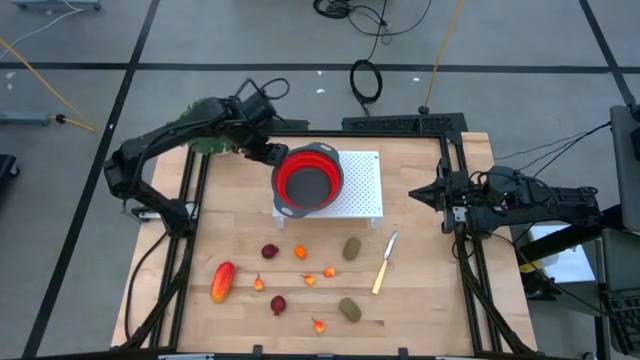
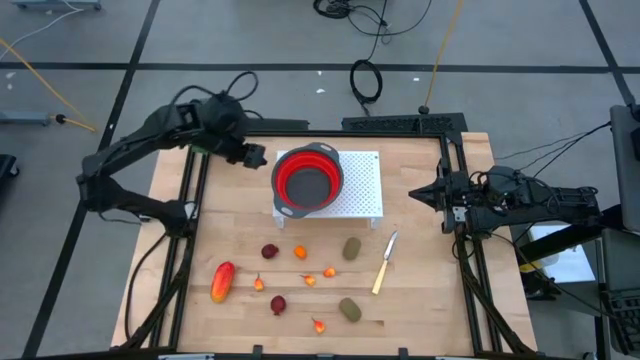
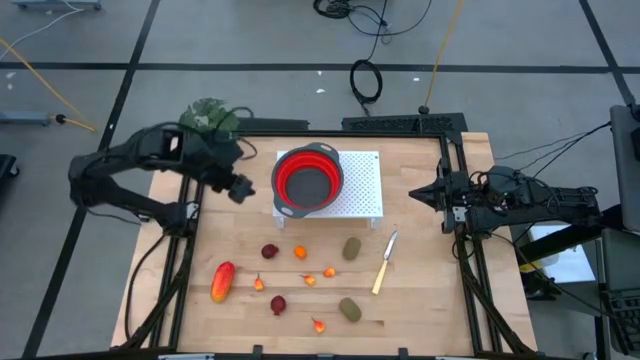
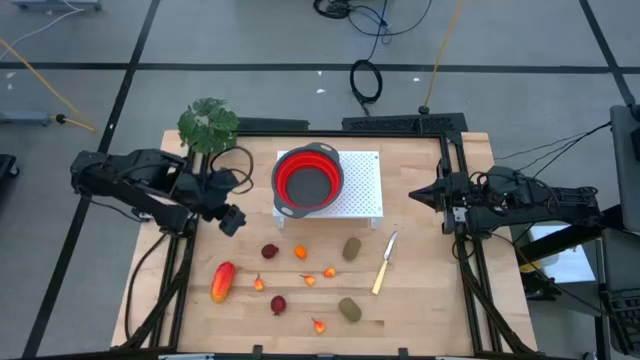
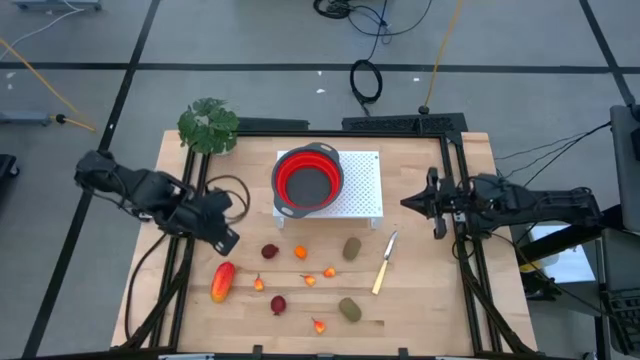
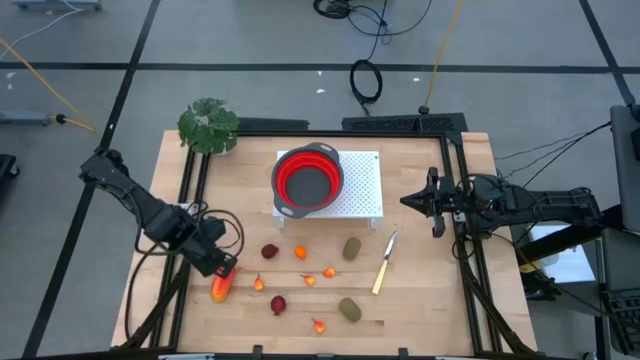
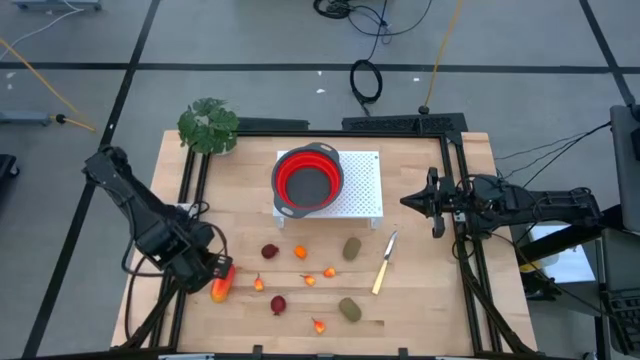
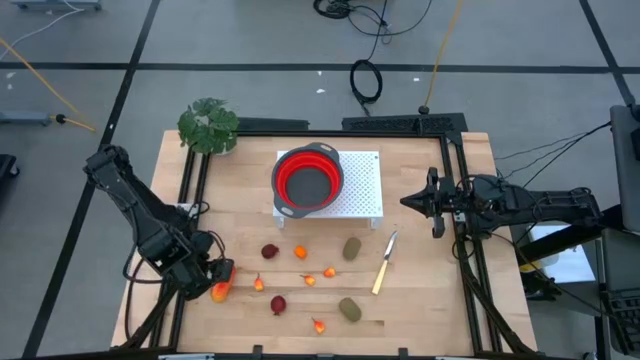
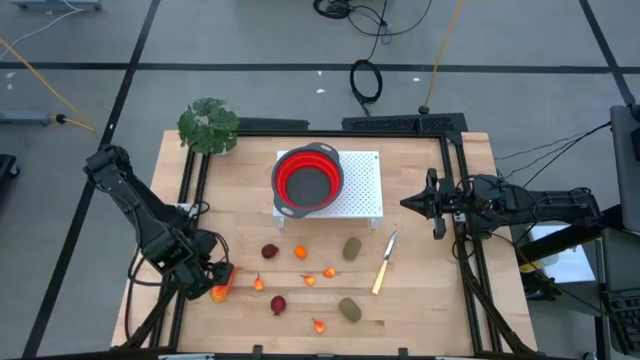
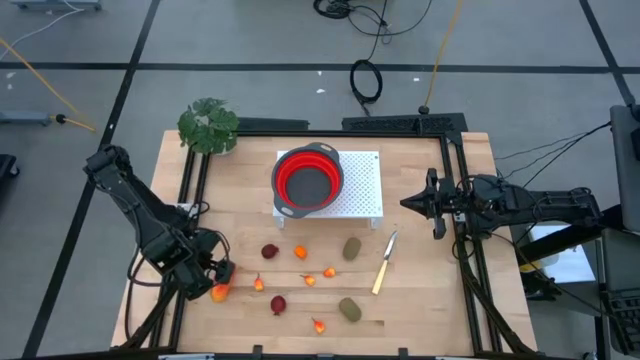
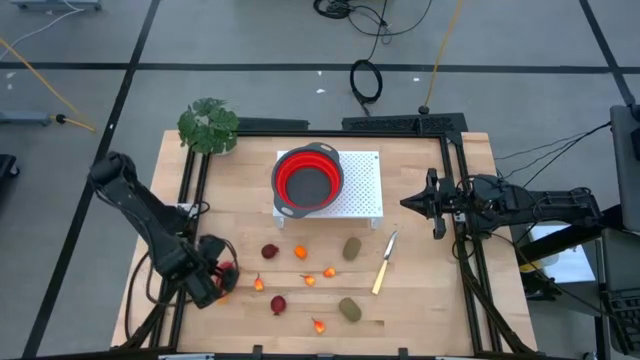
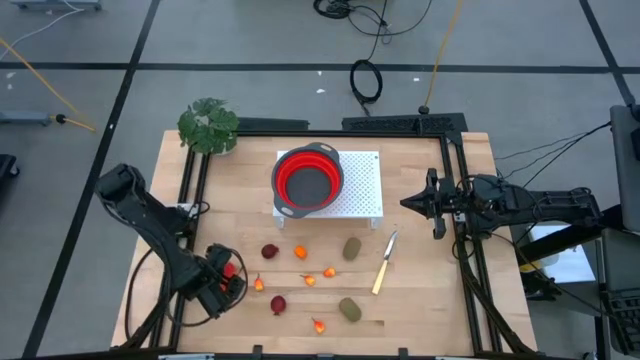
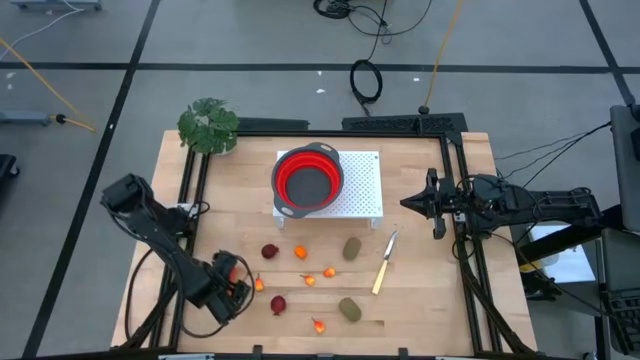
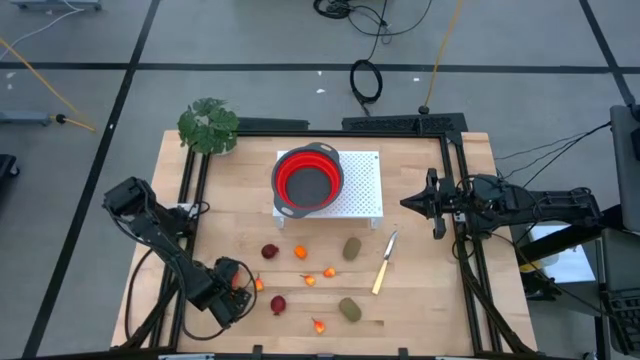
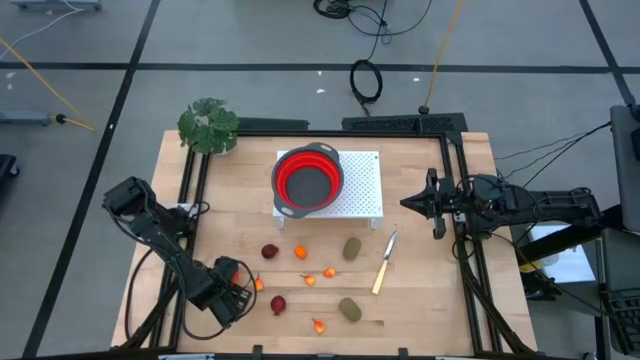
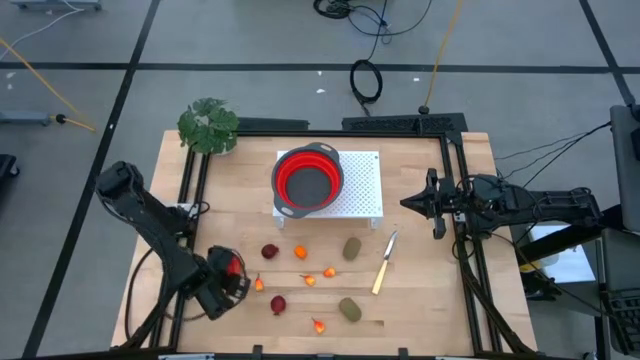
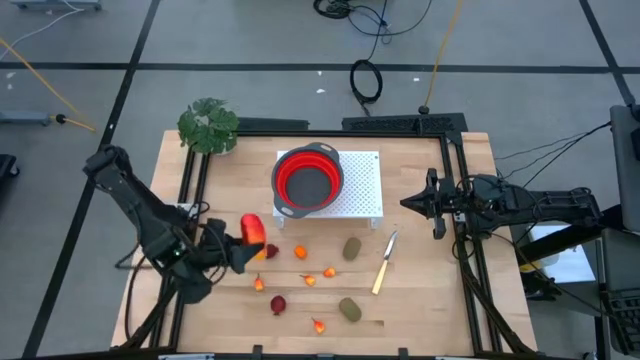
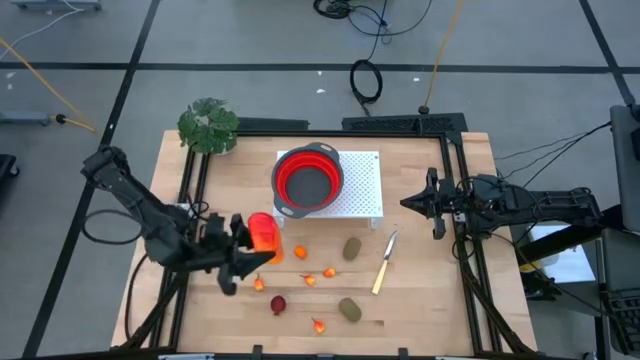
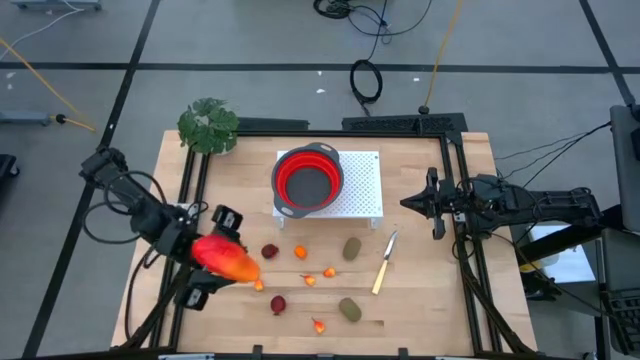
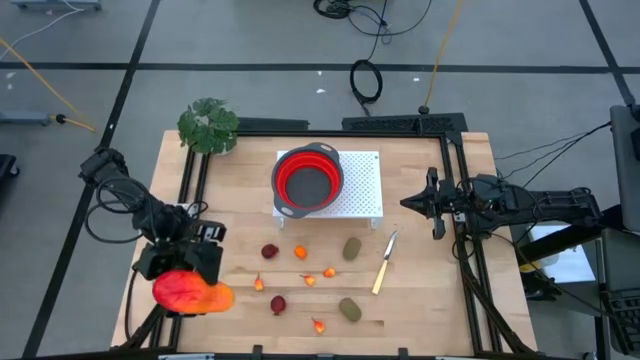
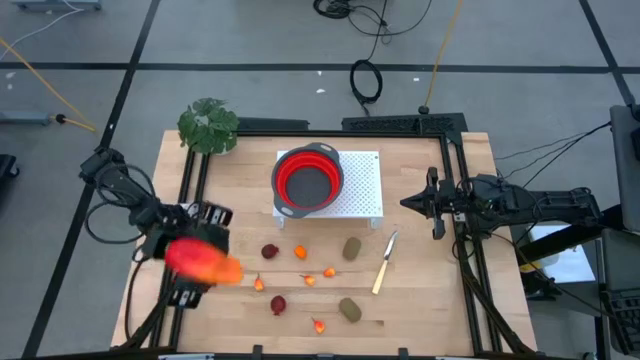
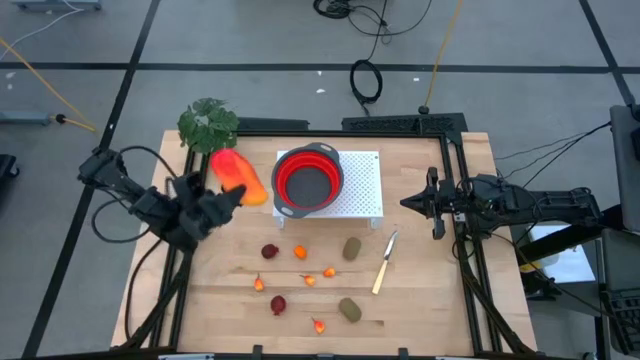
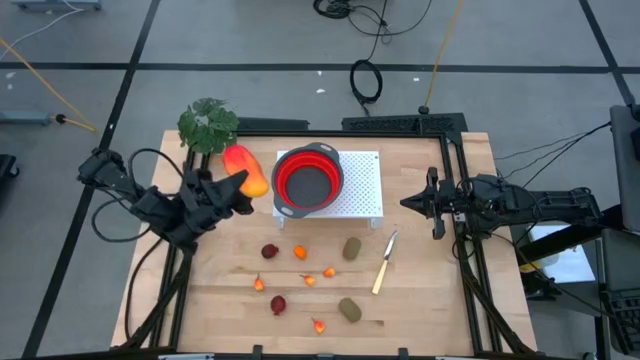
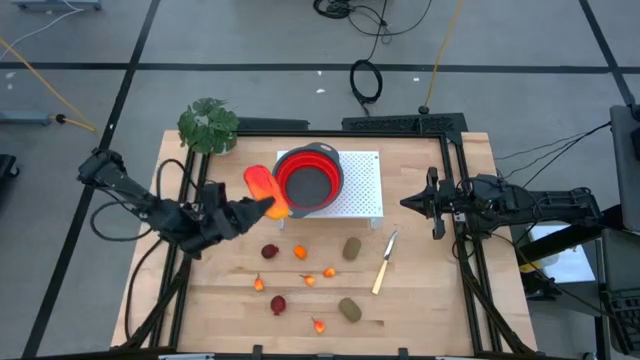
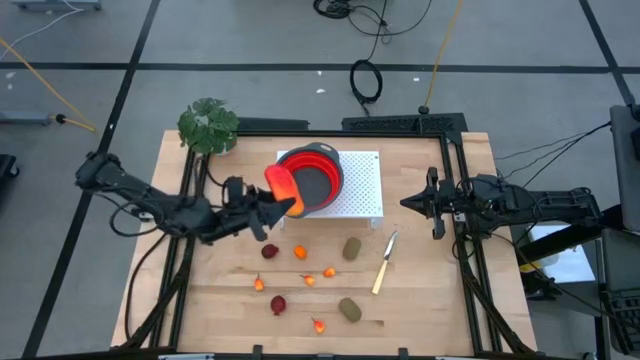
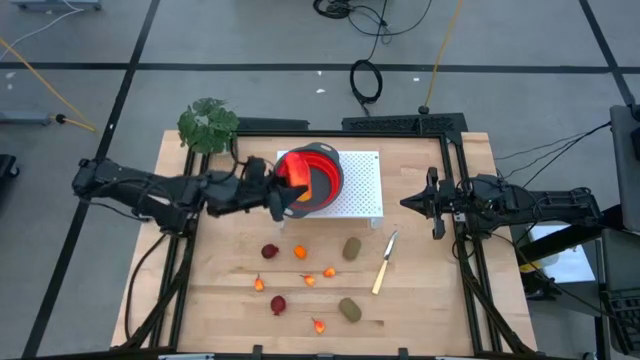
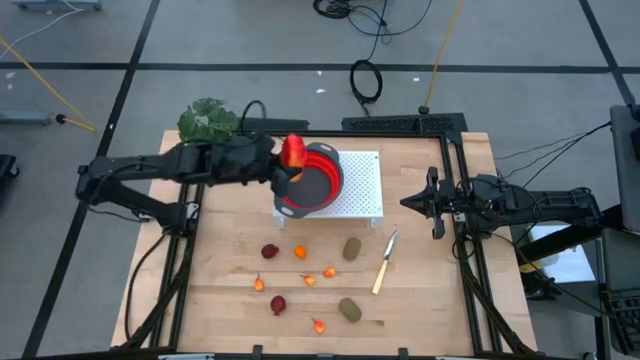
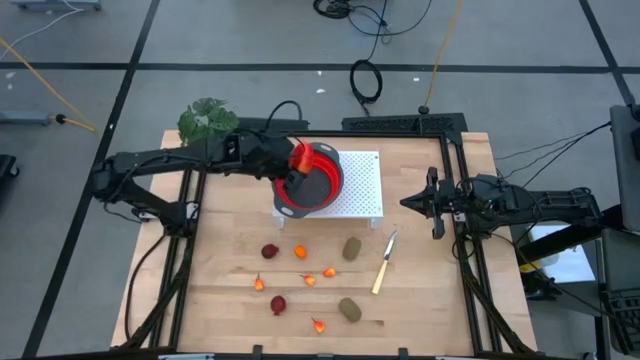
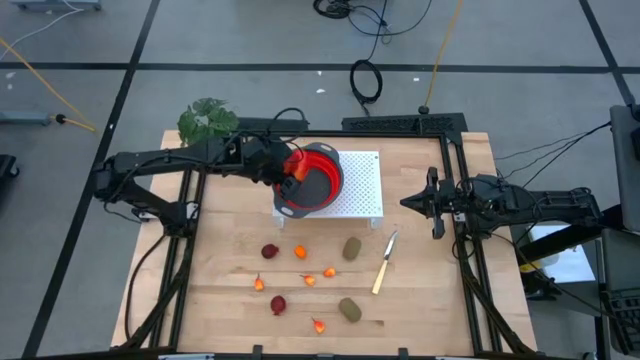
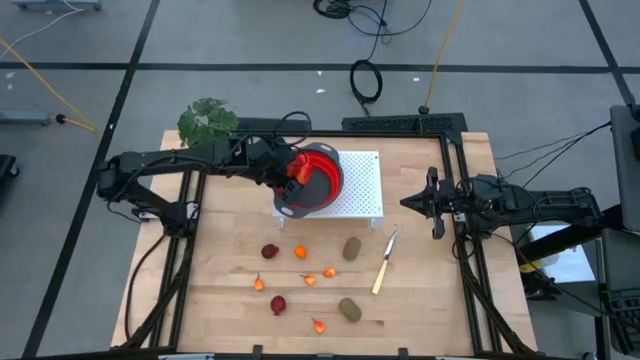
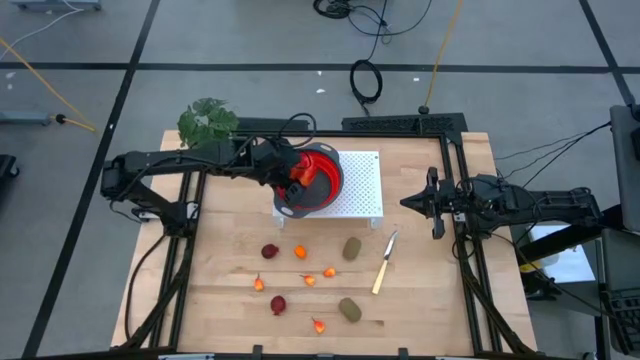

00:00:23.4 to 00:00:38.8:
Task: Pick & Place Fruit
Put the orange mango into the orange strainer bowl on the shelf

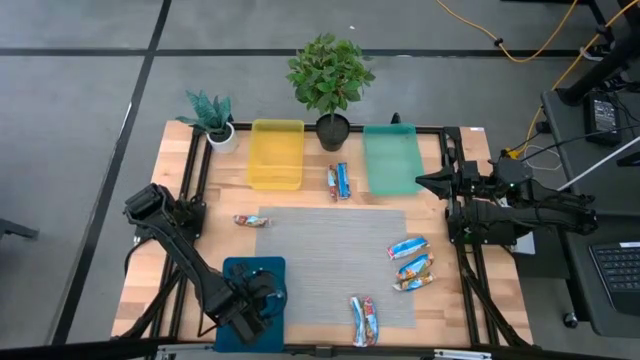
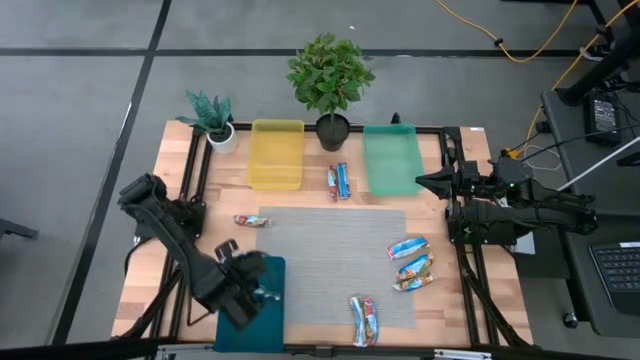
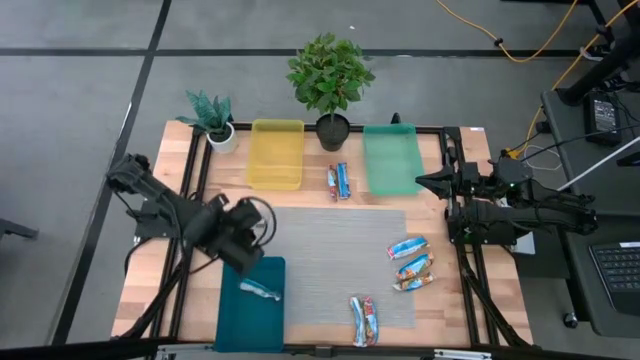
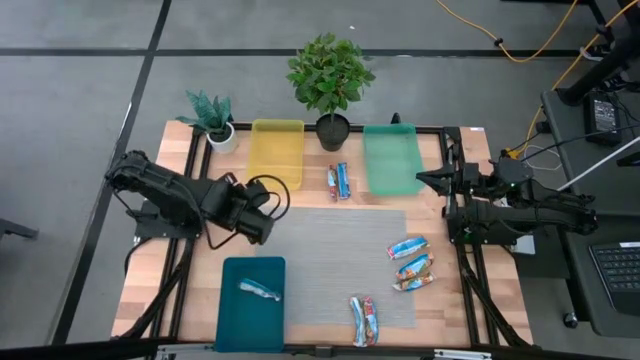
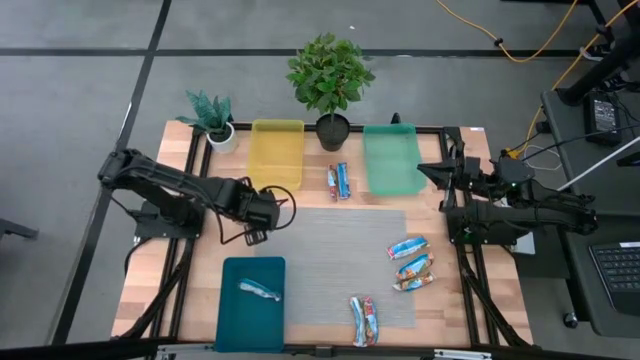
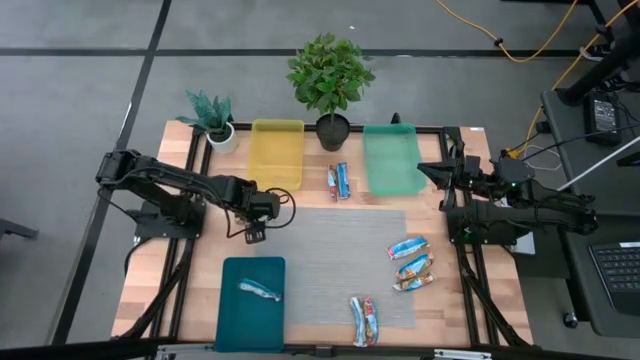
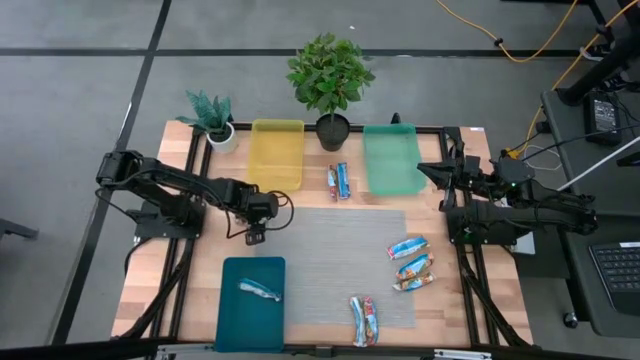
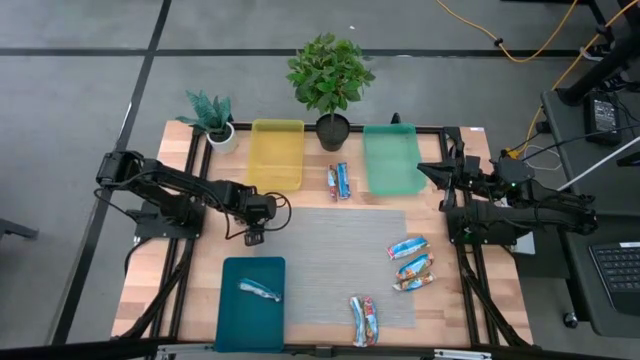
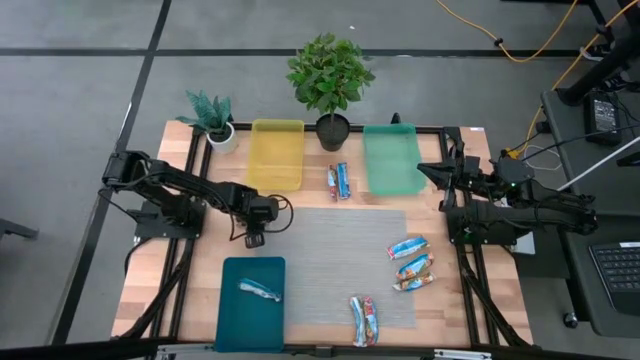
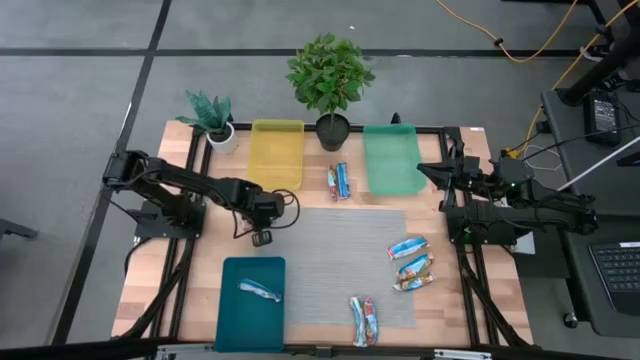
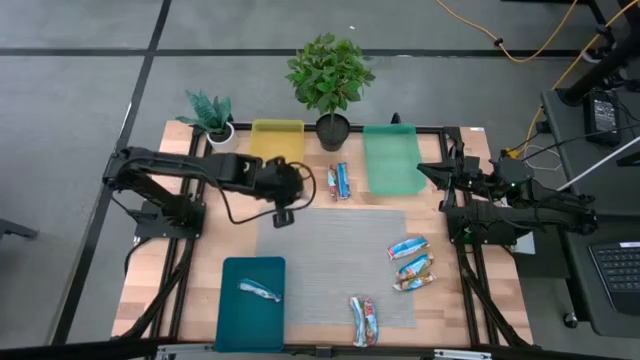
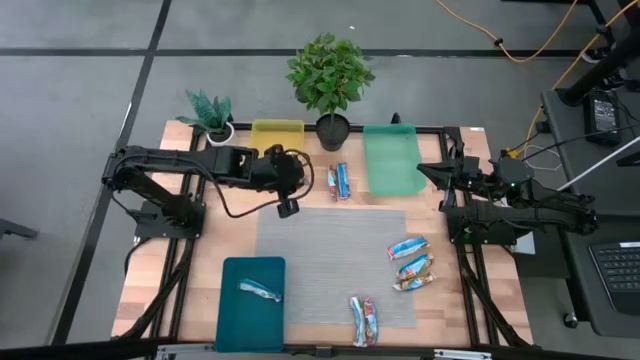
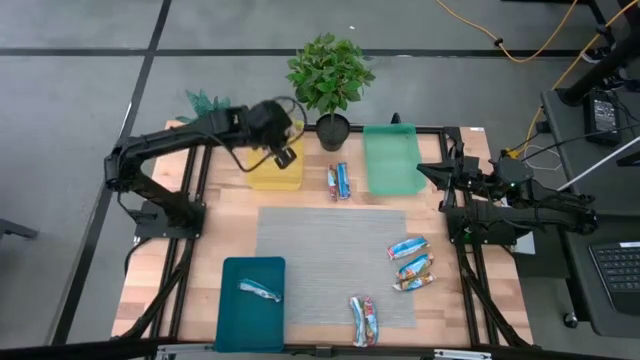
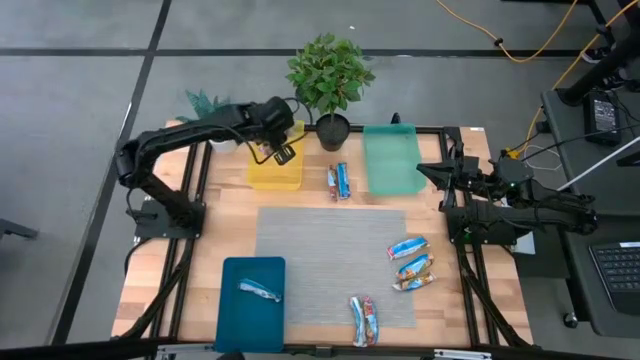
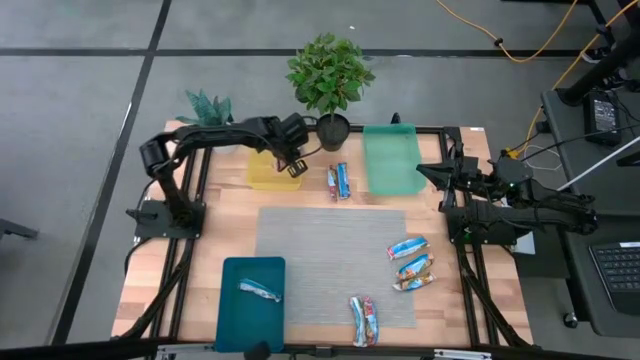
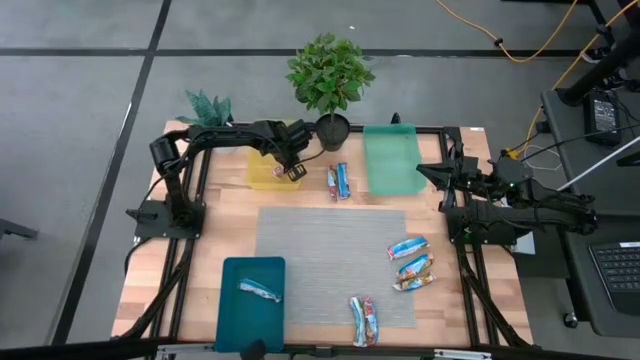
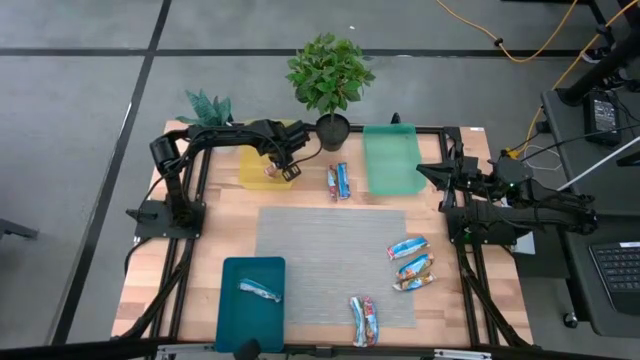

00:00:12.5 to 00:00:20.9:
Task: Pick and place Granola Bars by type
Put the red granola bar into the yellow transparent bin
